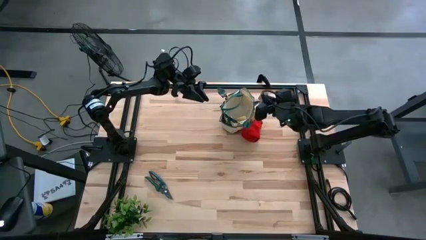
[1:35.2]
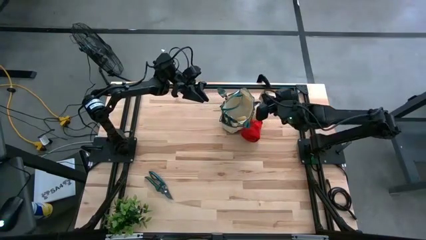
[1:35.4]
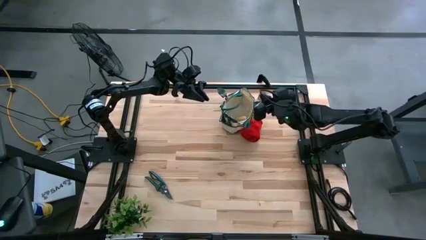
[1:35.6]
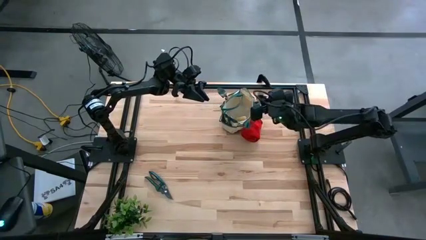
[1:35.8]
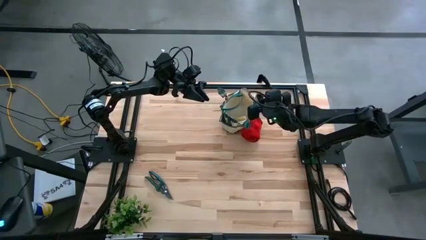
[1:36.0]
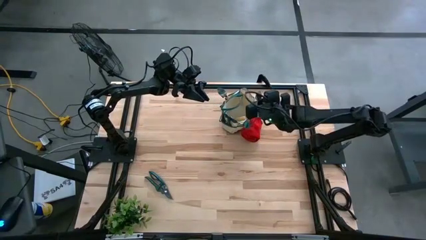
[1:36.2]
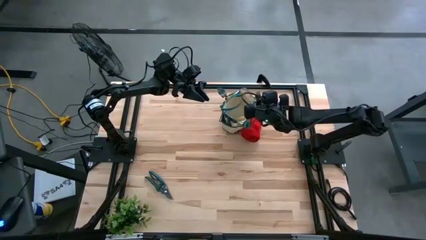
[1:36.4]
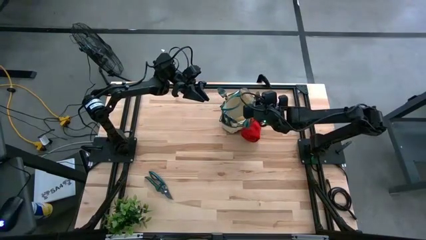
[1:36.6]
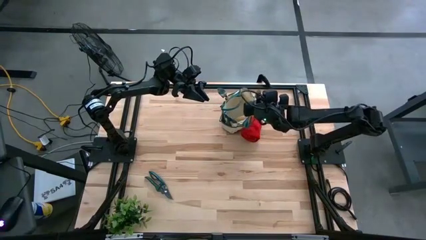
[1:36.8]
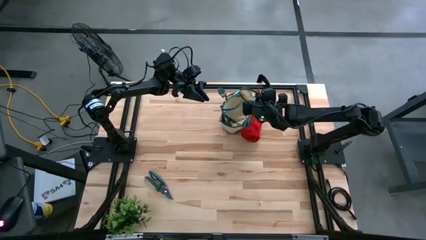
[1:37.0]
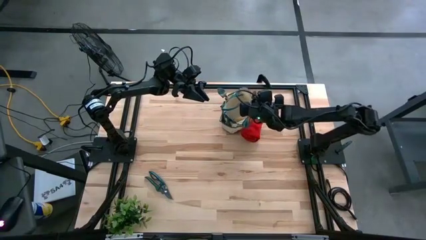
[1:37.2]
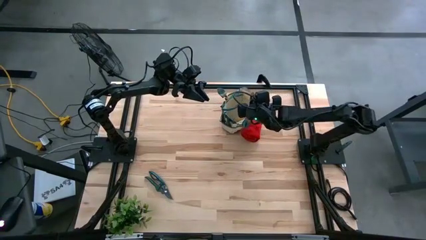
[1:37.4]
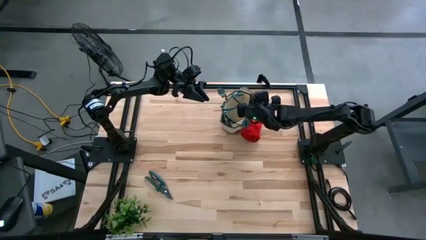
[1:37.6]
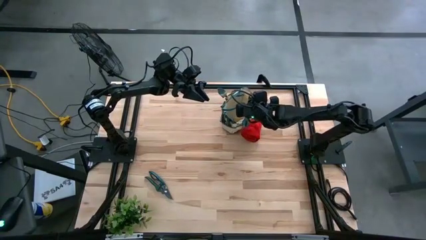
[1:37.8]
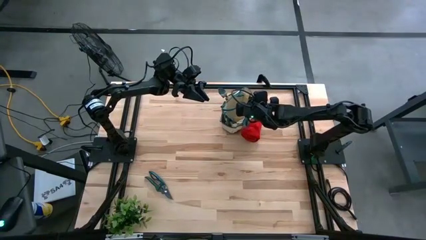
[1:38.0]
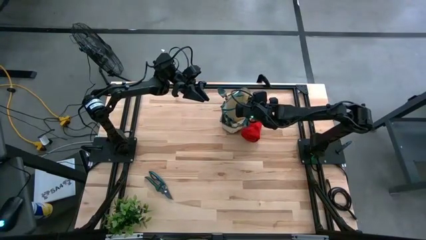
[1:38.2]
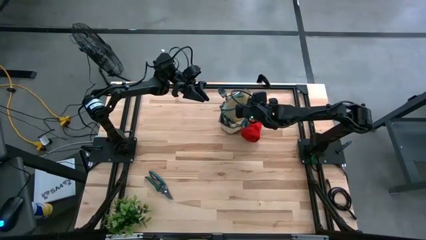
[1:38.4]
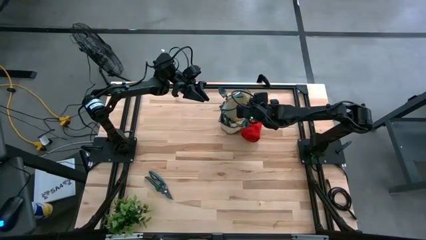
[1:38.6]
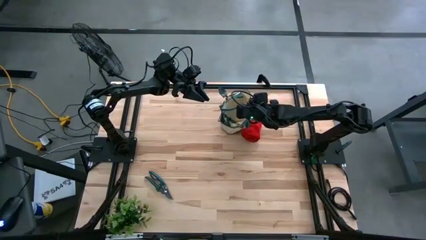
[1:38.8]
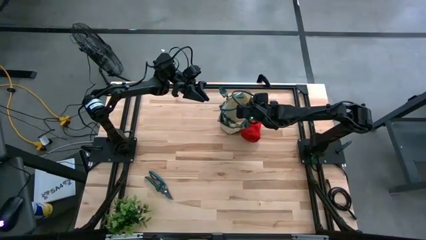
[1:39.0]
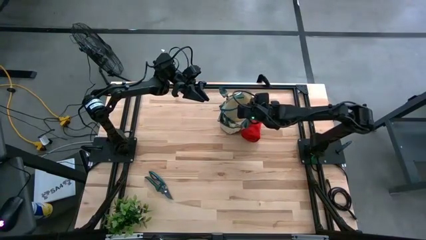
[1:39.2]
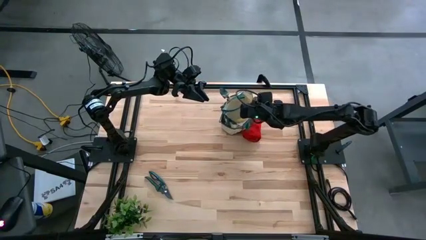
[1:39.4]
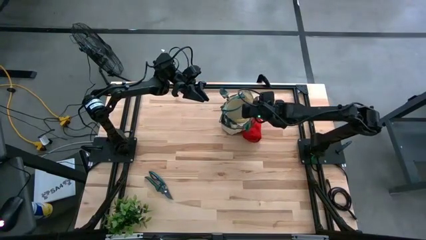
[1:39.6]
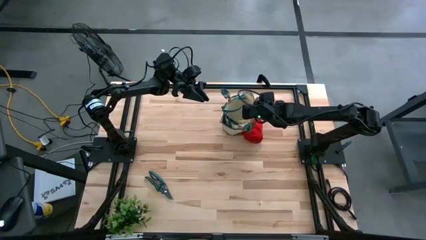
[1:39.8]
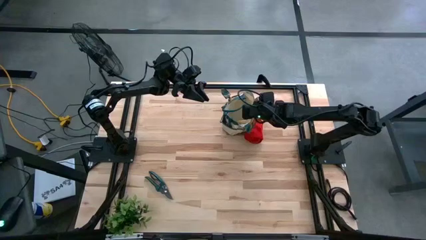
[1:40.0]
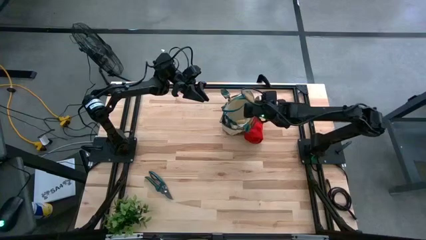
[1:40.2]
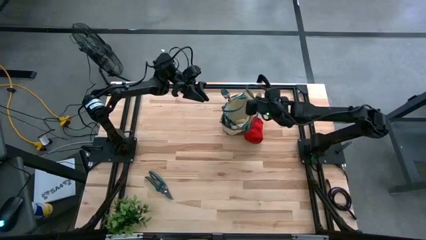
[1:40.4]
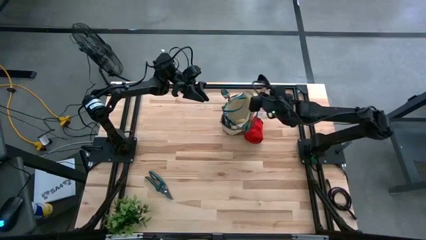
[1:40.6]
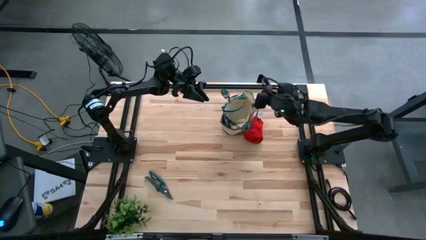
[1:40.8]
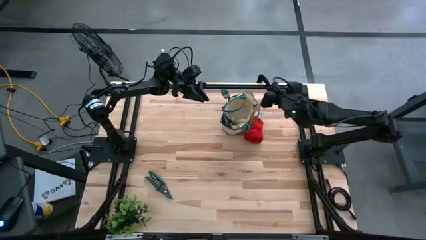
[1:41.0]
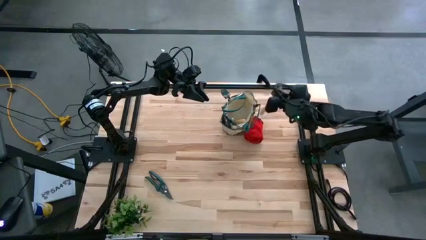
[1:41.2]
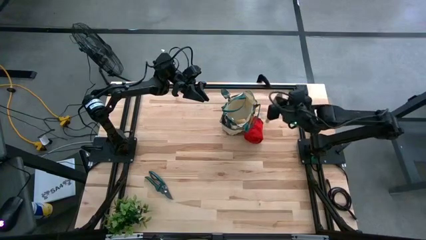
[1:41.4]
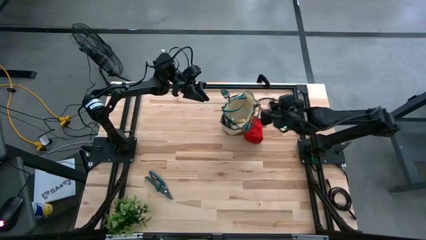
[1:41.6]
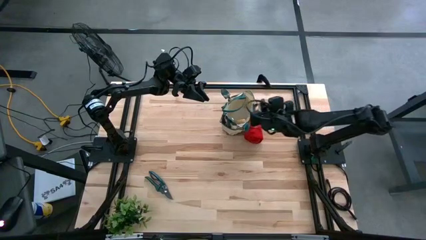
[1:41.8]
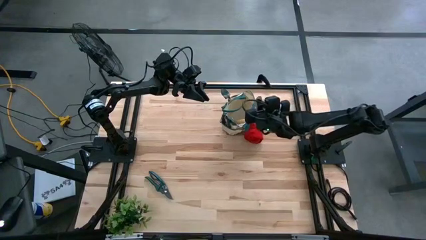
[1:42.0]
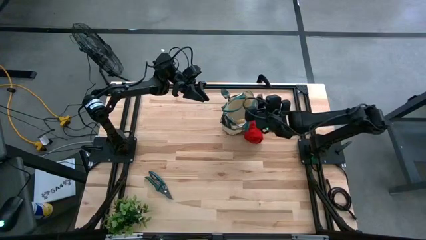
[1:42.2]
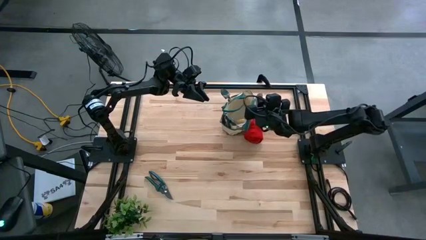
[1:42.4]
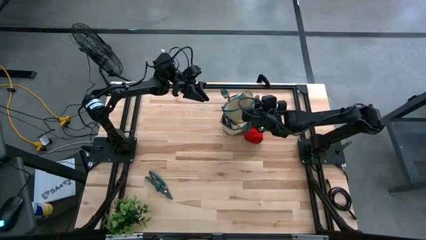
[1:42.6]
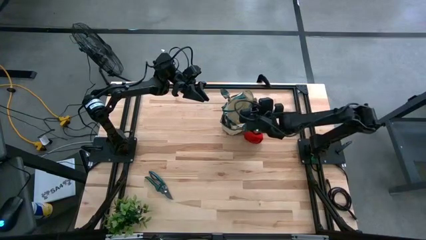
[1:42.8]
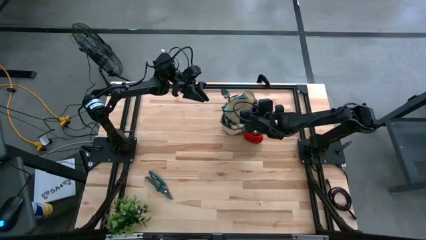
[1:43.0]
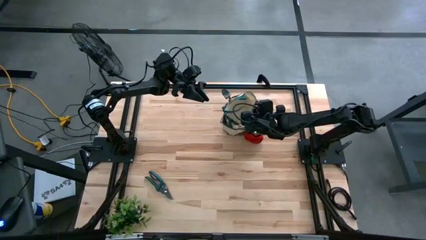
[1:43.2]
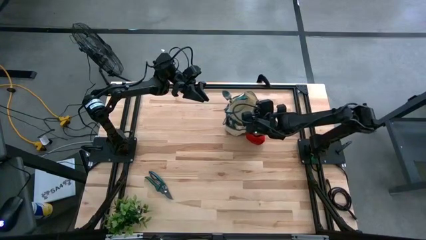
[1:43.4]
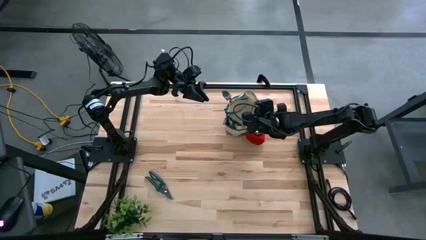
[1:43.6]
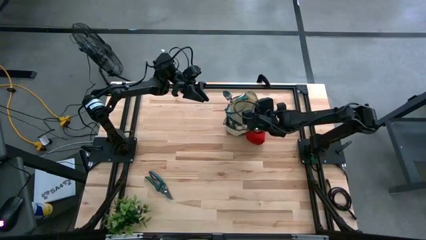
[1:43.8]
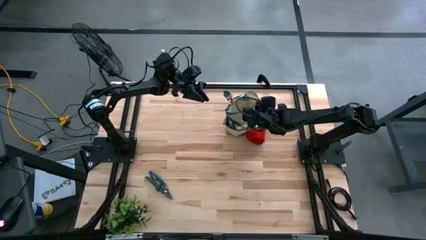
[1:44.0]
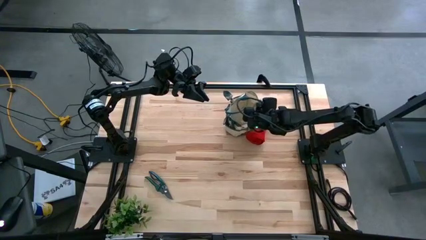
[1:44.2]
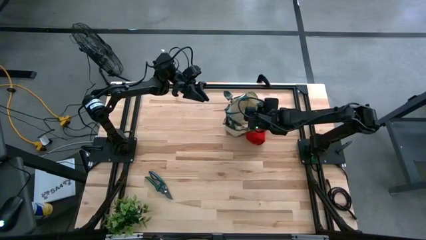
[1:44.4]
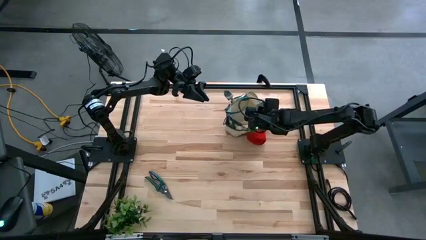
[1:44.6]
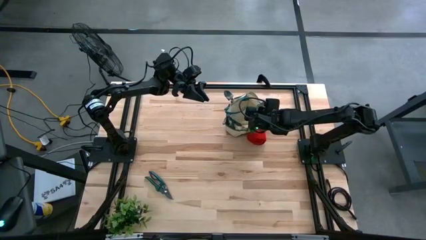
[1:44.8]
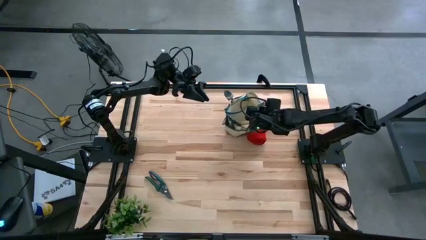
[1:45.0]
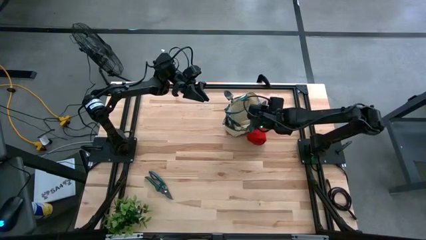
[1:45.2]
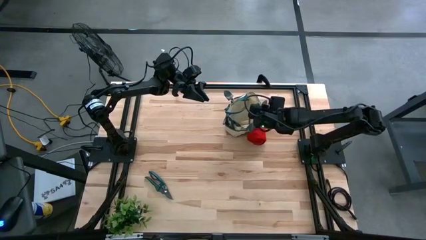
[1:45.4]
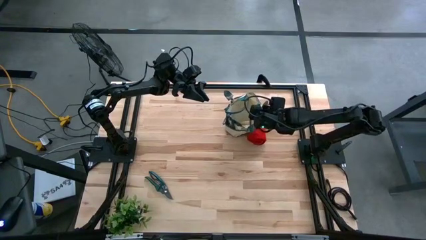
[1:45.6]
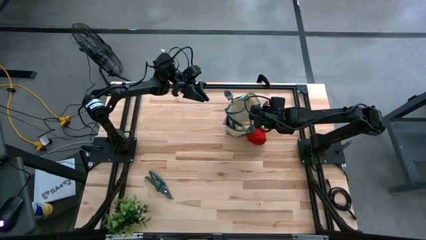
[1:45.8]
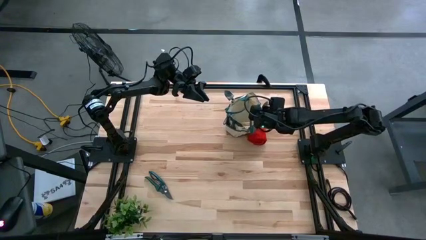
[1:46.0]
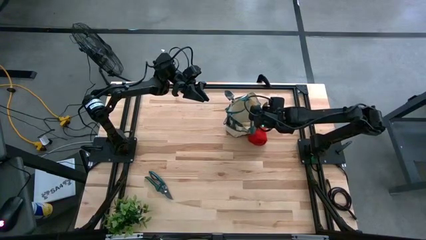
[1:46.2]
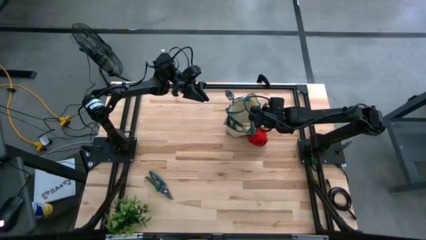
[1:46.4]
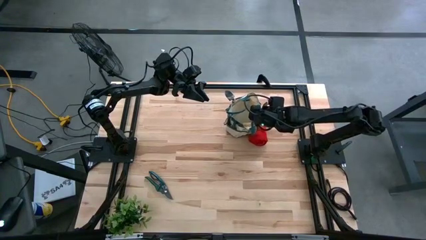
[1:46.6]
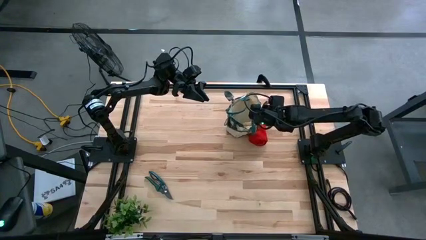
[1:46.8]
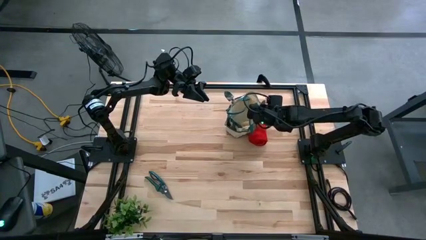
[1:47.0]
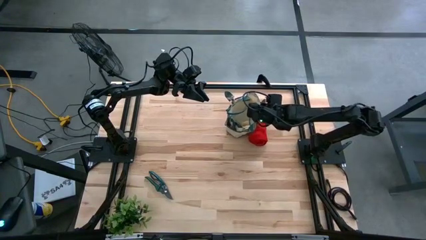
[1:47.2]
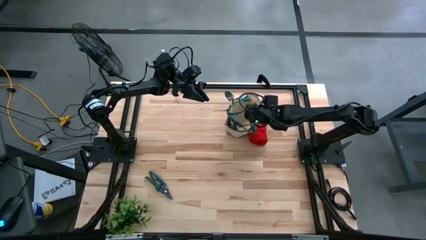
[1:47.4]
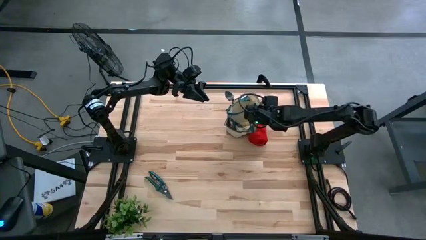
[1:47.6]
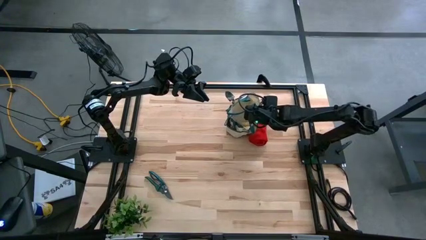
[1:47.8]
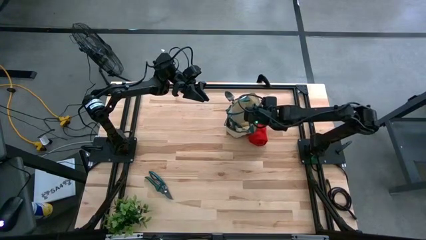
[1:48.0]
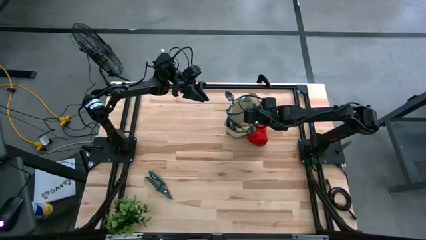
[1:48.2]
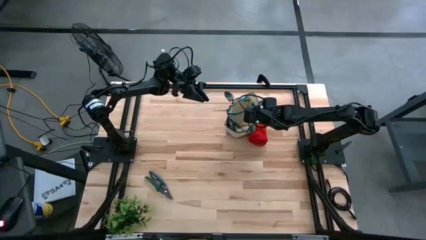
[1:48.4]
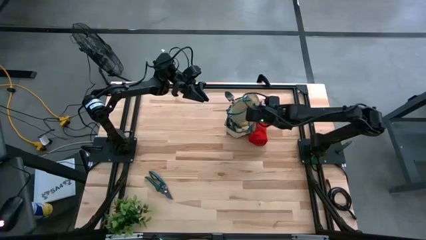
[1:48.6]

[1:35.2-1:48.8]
Task: Pick & Place Garden tools in Gardening bag
Put the brown trowel into the gardening bag

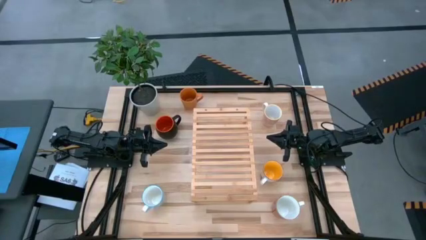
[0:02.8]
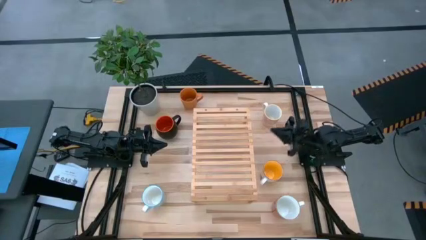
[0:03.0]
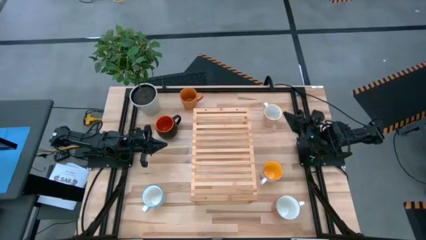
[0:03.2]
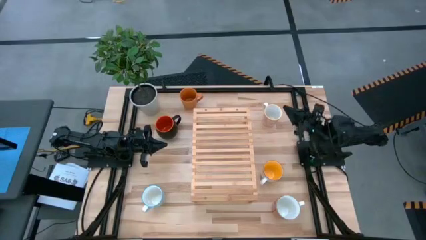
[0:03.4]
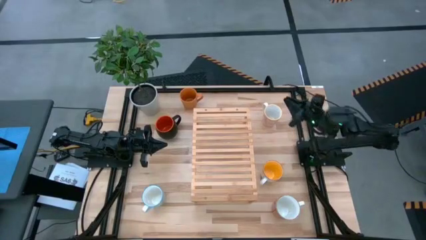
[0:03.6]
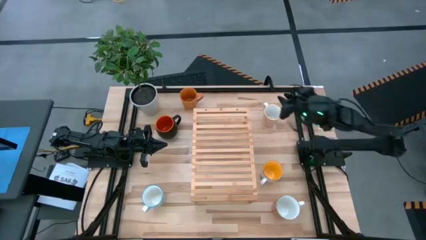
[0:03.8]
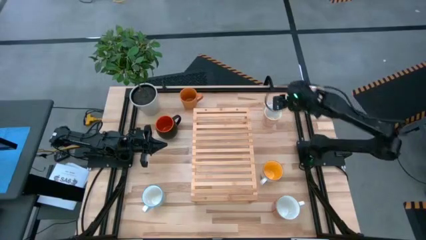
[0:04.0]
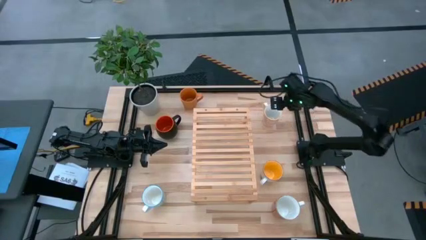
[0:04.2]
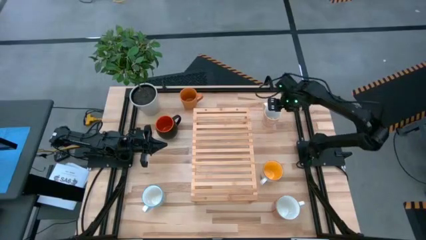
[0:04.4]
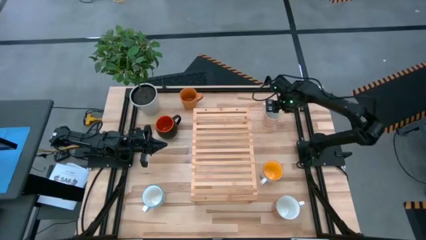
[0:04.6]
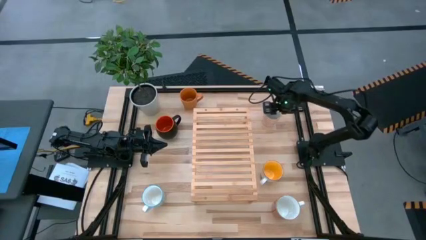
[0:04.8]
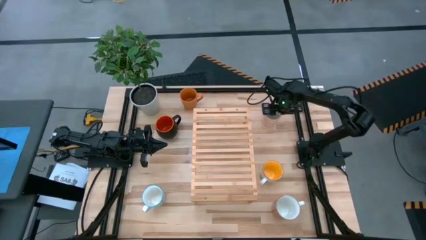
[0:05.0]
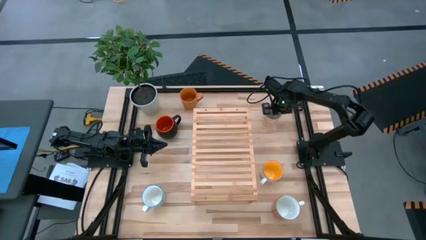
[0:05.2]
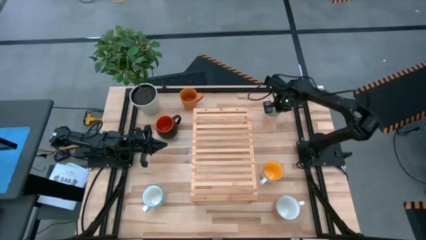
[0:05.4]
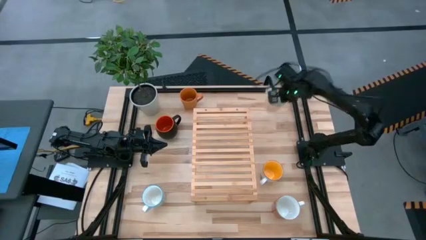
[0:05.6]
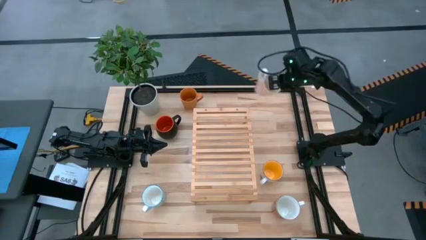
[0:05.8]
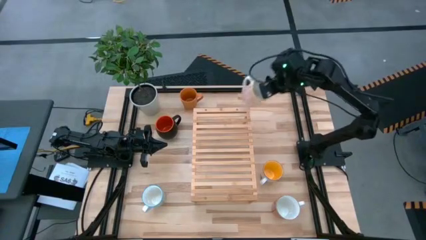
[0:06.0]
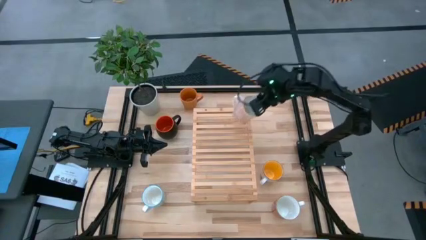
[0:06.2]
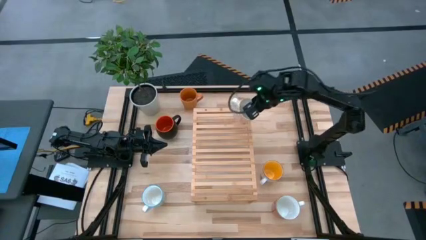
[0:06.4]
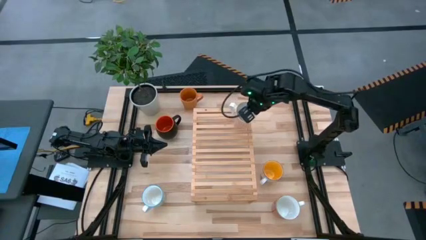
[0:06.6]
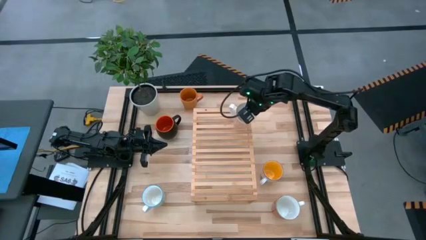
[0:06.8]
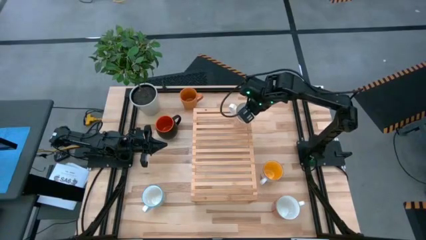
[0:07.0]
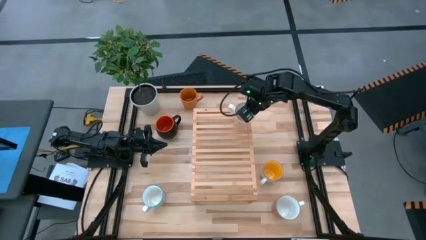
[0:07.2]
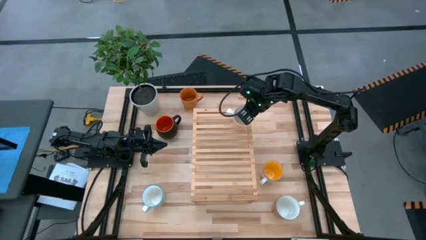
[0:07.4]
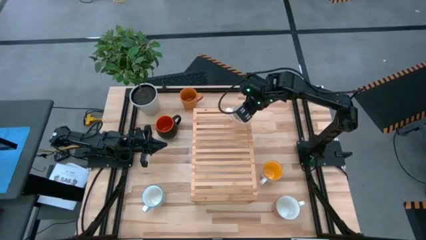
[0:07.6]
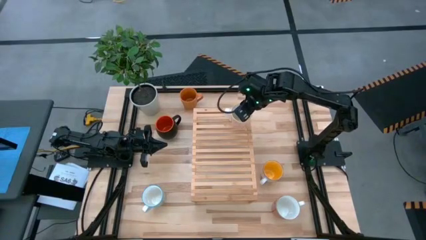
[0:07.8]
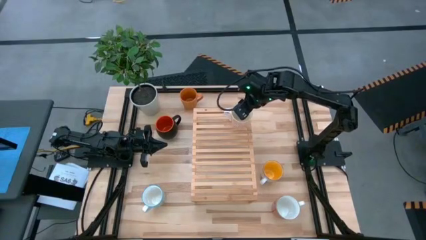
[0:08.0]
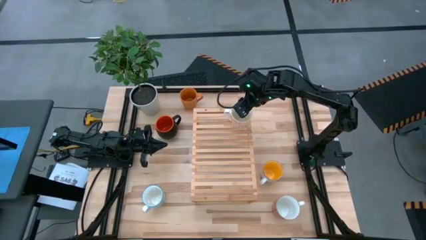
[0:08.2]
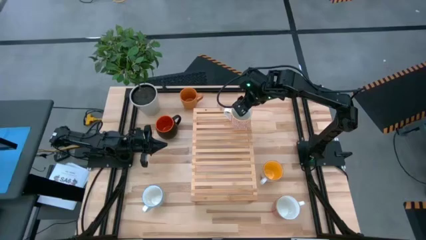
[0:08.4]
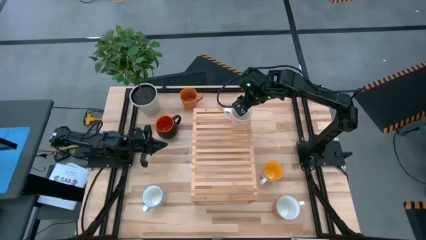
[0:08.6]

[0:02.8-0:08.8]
Task: Place coffee mugs
Put the white yellow mug on the shelf
